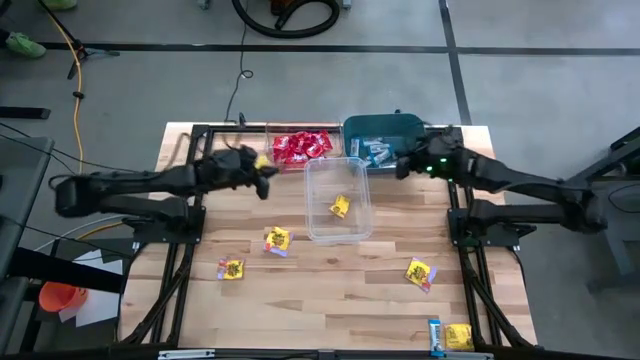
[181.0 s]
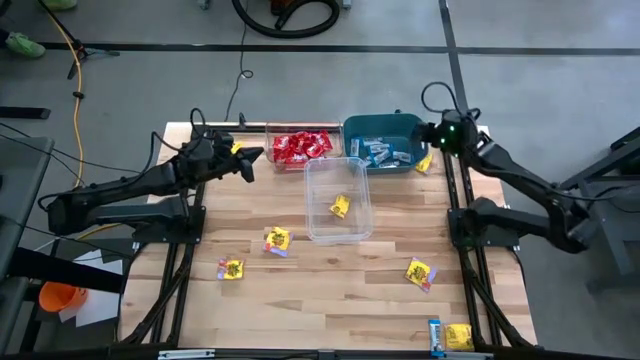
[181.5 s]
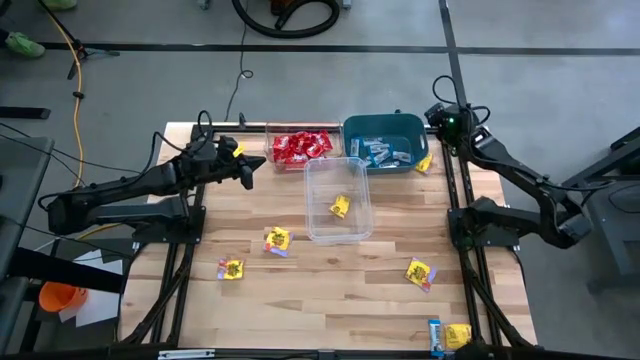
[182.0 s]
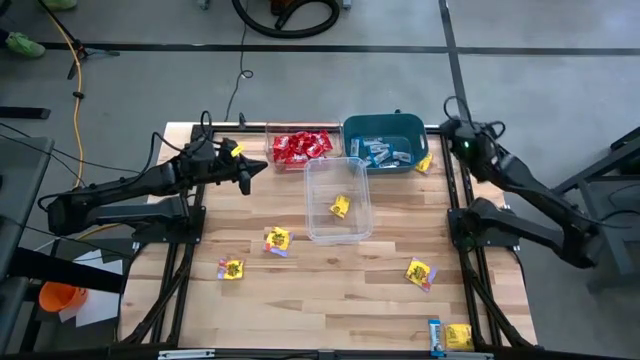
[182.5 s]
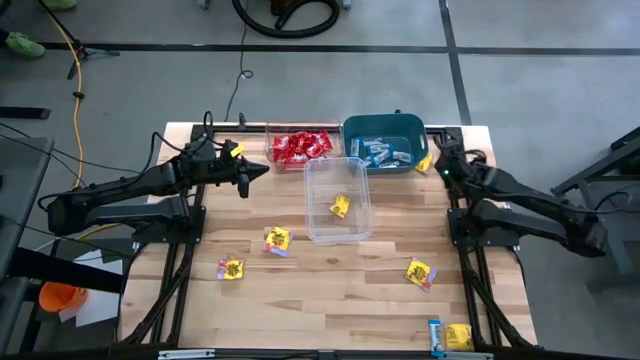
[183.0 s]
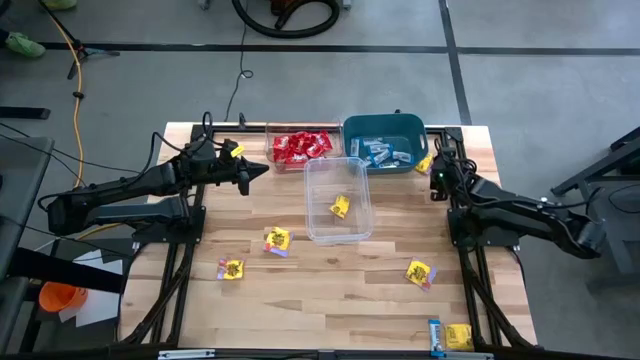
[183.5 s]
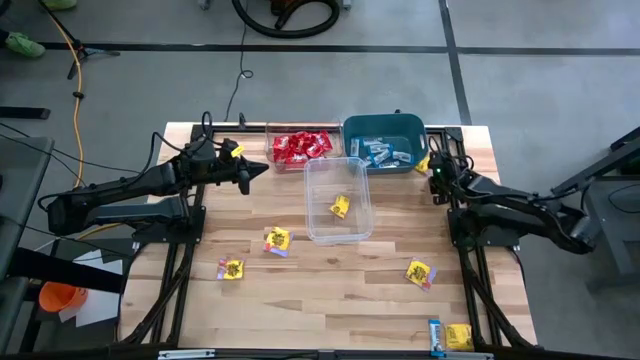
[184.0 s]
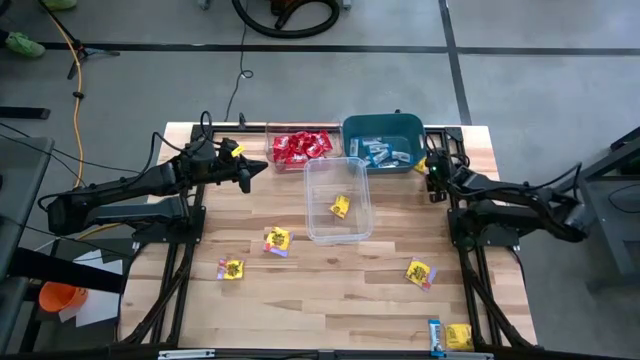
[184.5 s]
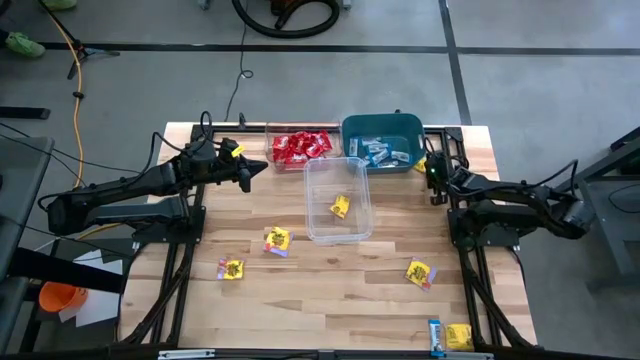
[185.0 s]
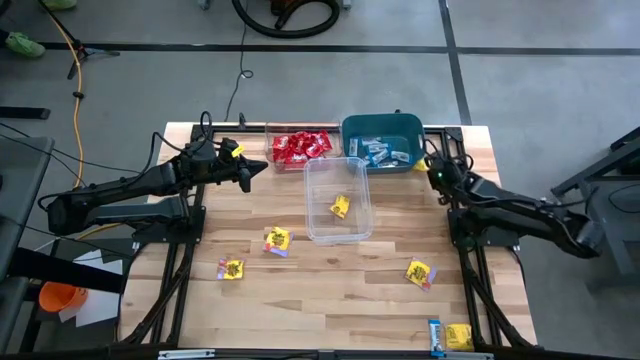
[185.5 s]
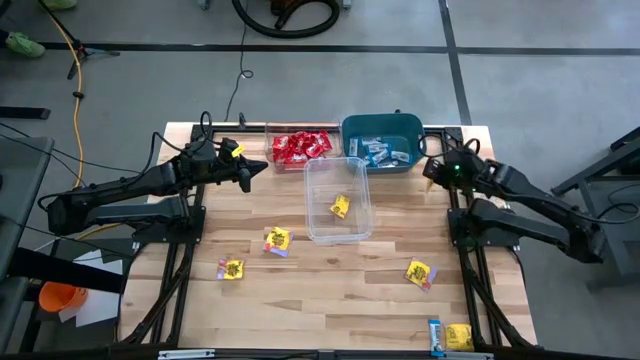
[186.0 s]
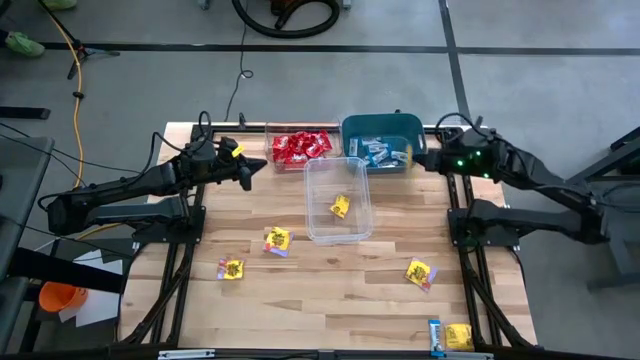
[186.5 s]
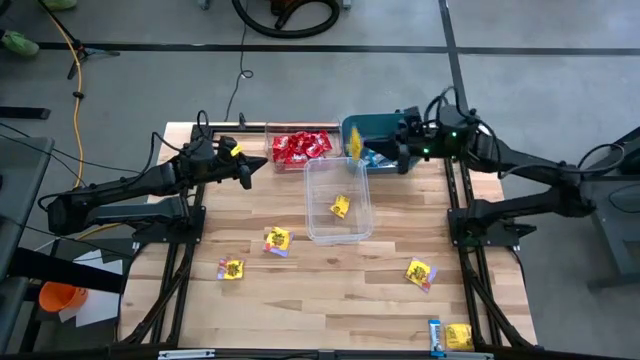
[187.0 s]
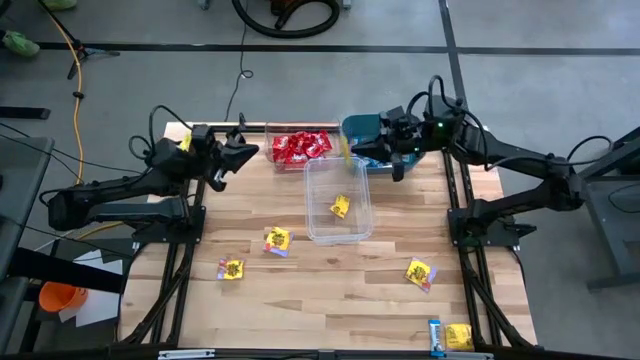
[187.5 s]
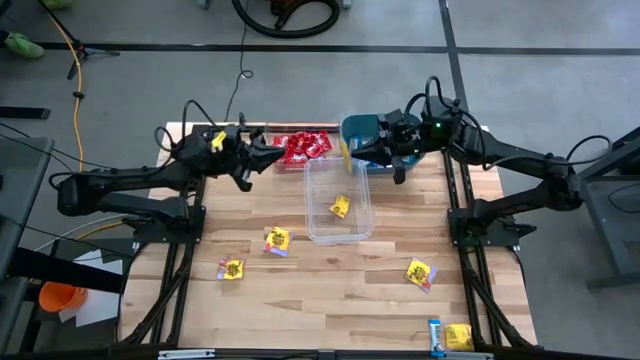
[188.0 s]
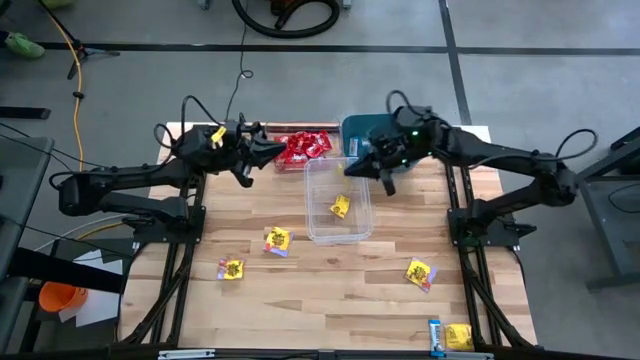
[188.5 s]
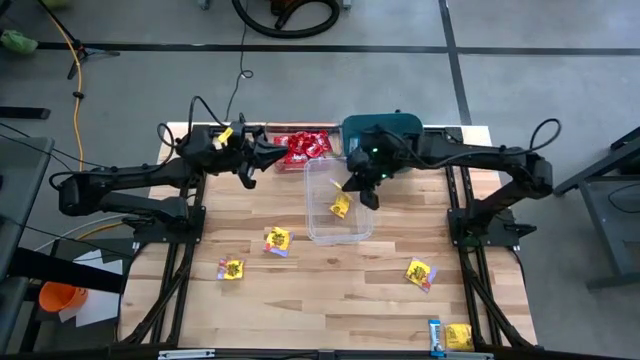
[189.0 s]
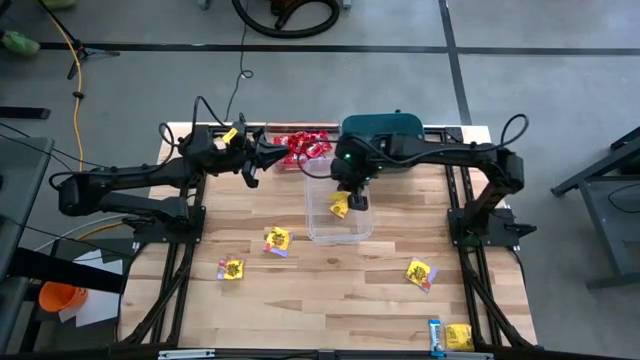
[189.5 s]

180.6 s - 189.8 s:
Task: Sort candy
Put the yellow candy into the transparent container

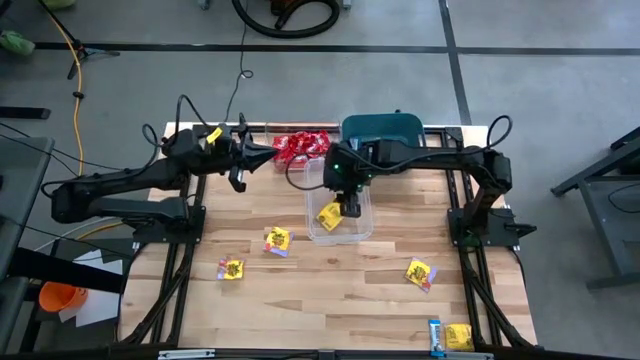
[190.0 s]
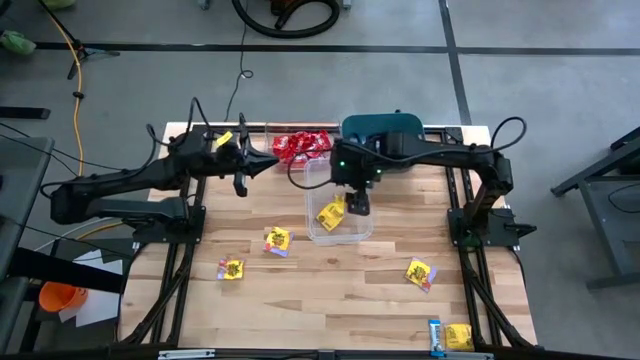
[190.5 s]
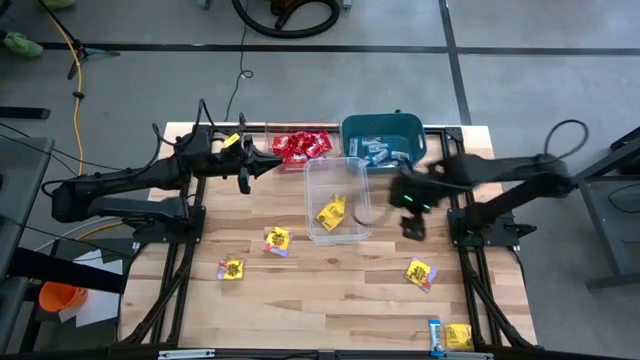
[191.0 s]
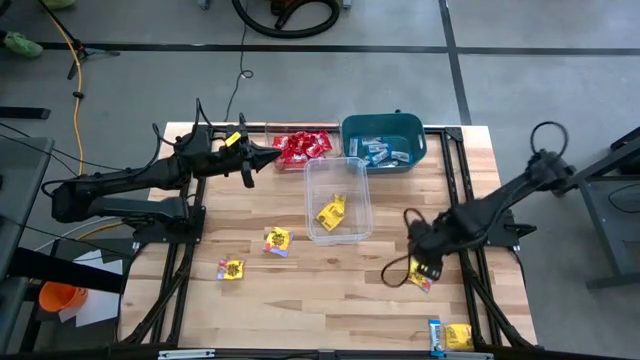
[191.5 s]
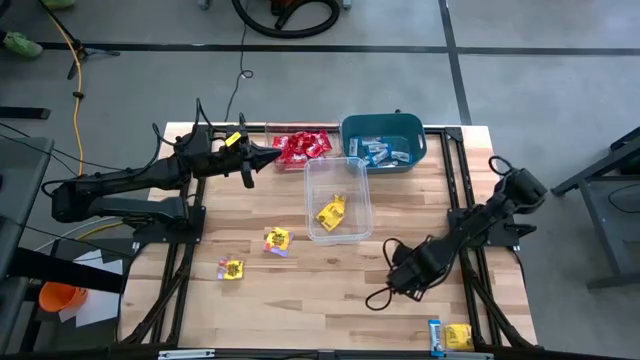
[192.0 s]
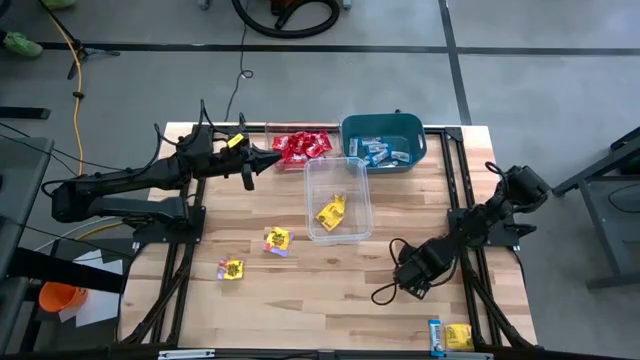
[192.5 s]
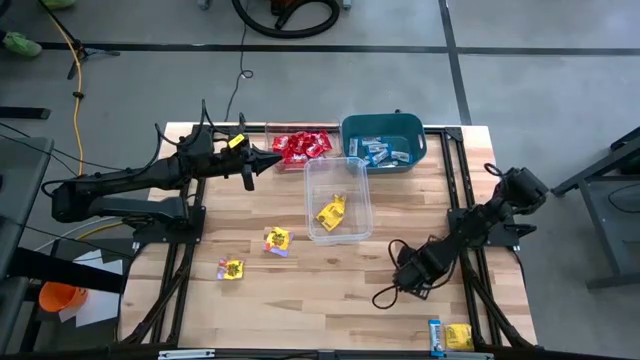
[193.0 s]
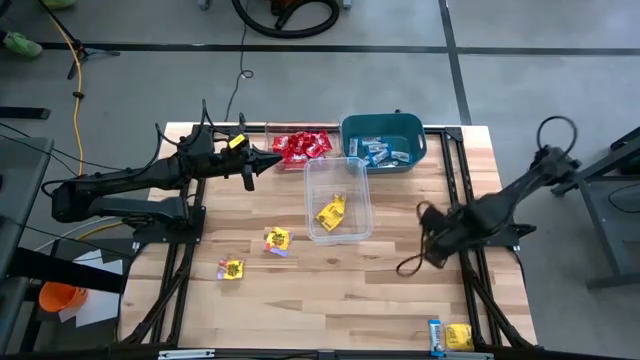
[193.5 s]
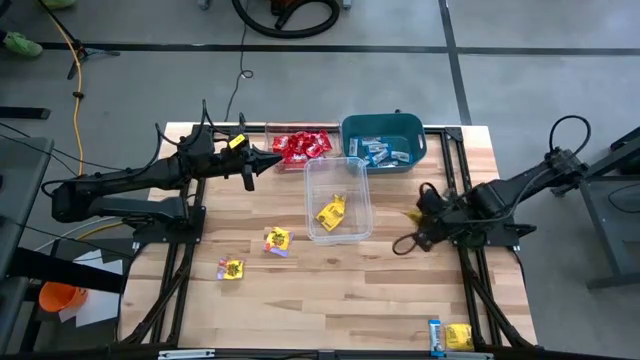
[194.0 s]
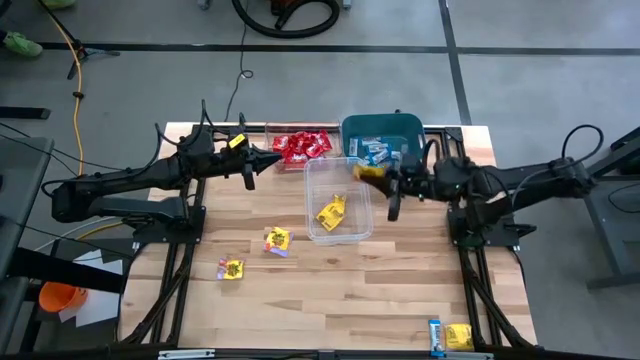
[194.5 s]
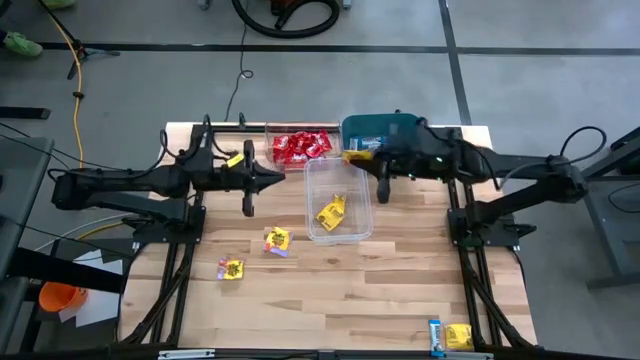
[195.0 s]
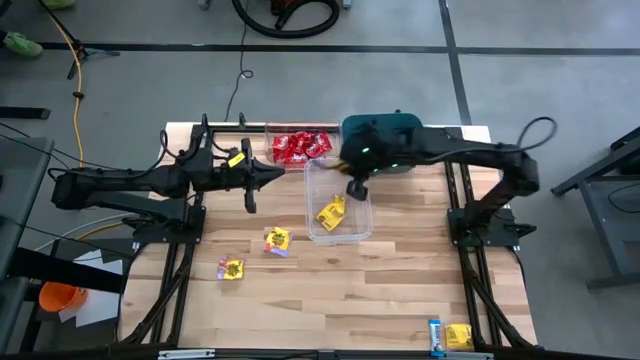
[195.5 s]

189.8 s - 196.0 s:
Put the yellow candy into the transparent container

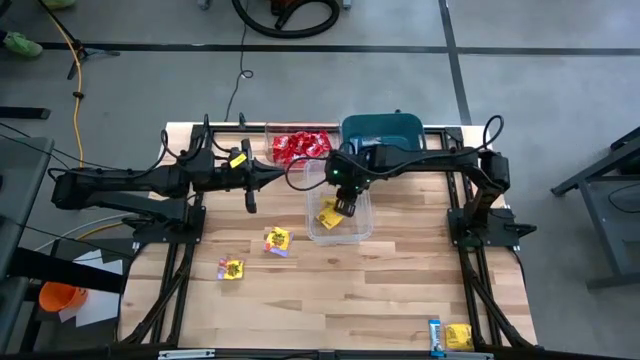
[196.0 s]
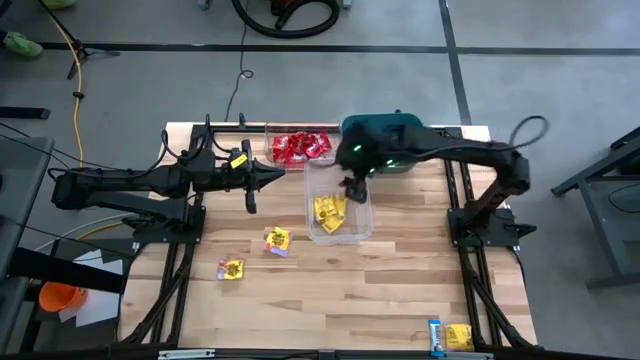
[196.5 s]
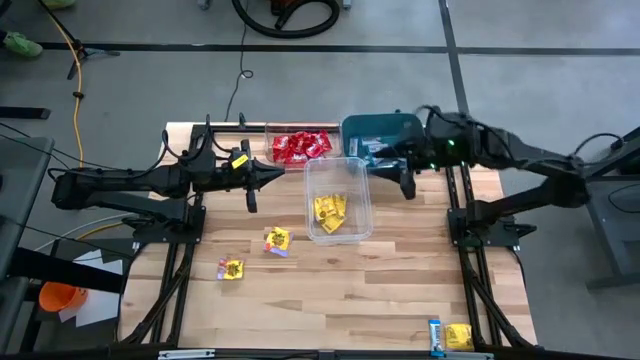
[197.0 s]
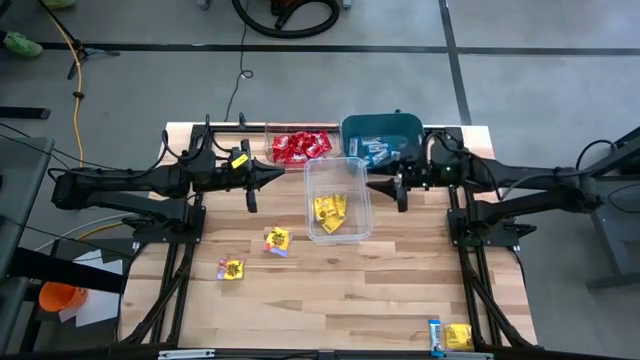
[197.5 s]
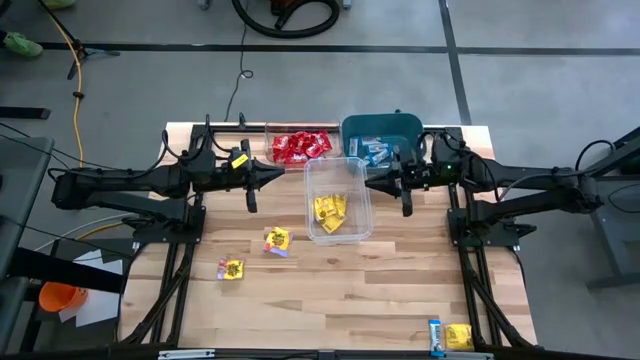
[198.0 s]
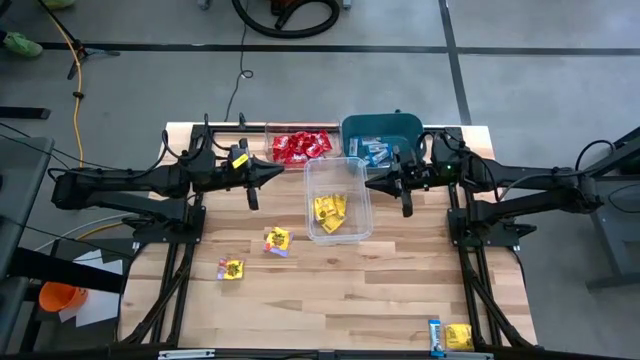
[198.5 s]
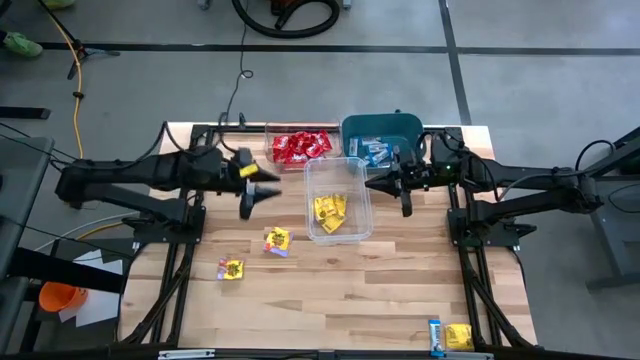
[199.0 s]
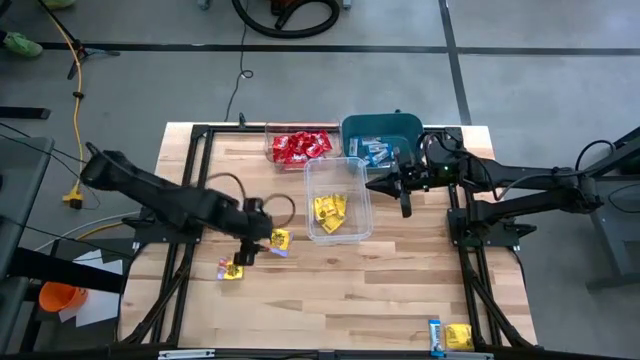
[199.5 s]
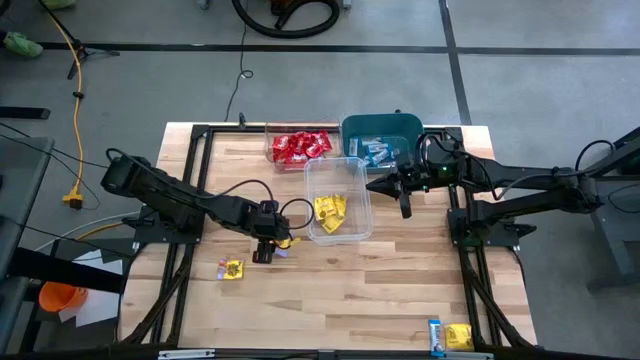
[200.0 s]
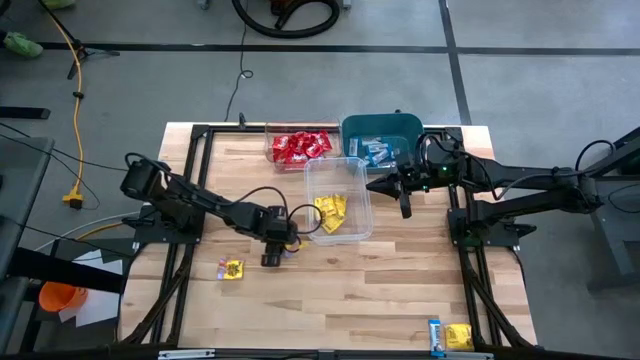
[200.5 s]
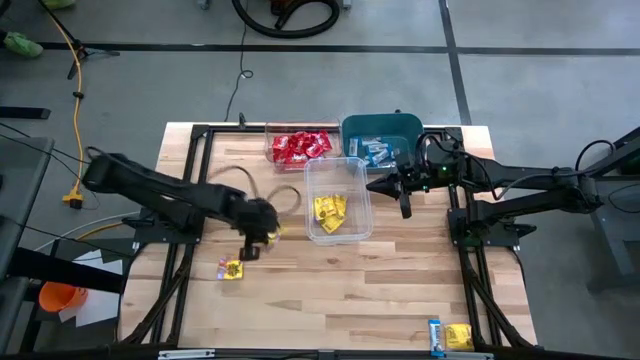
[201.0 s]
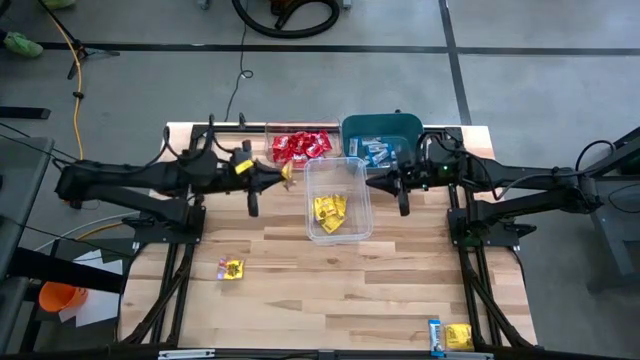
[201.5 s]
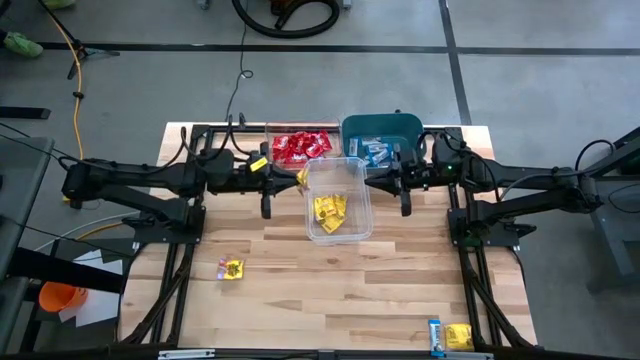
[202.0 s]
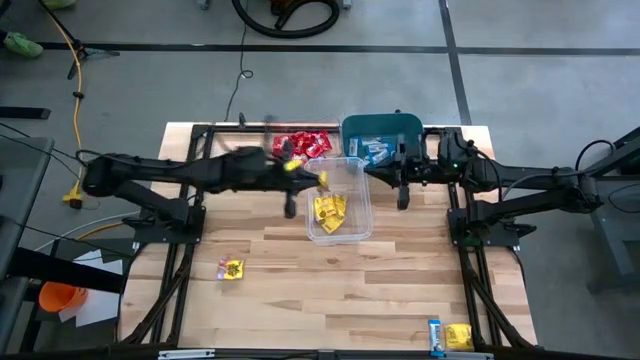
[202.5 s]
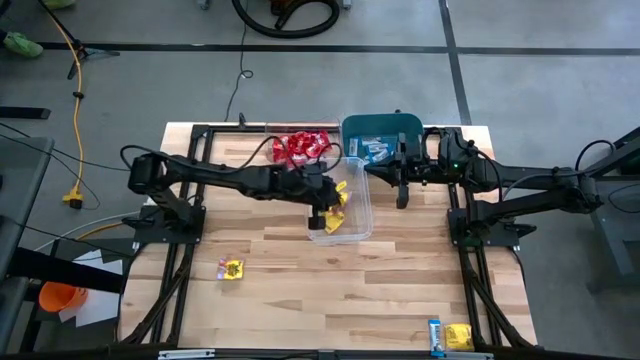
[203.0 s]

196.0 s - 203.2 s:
Put the yellow candy into the transparent container
